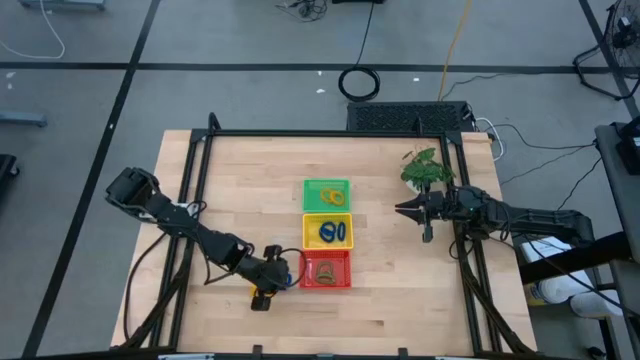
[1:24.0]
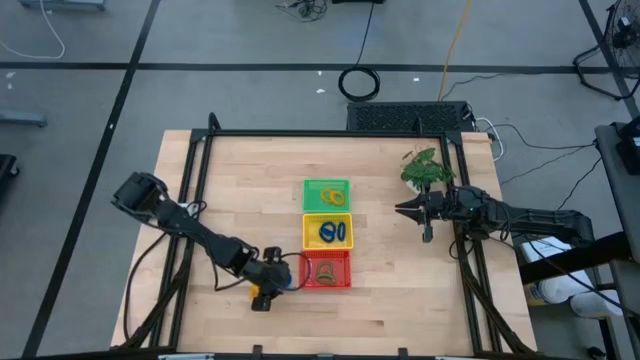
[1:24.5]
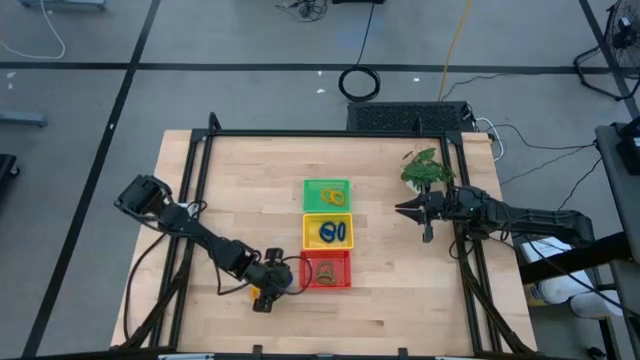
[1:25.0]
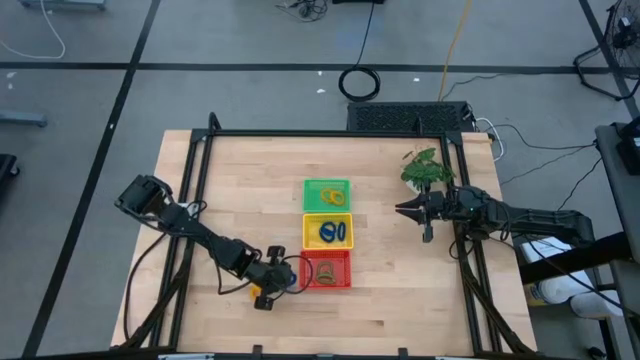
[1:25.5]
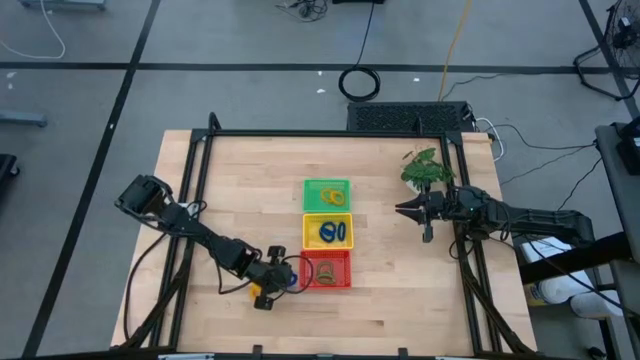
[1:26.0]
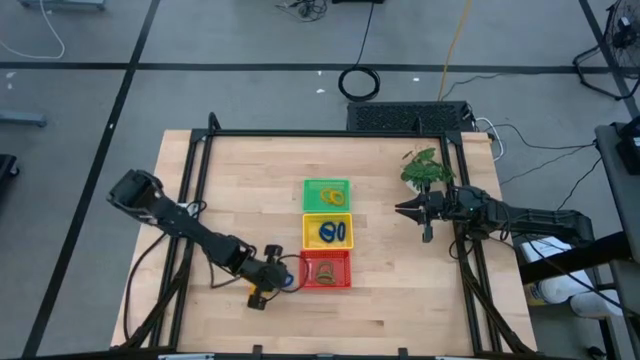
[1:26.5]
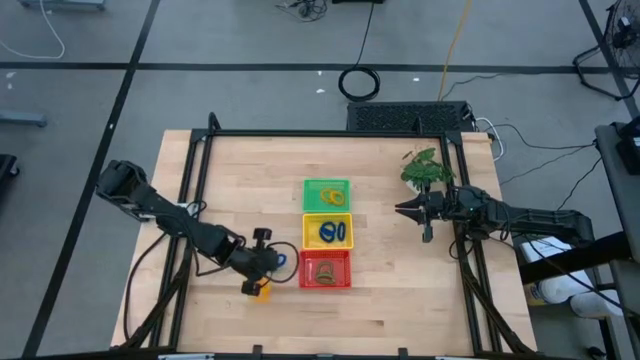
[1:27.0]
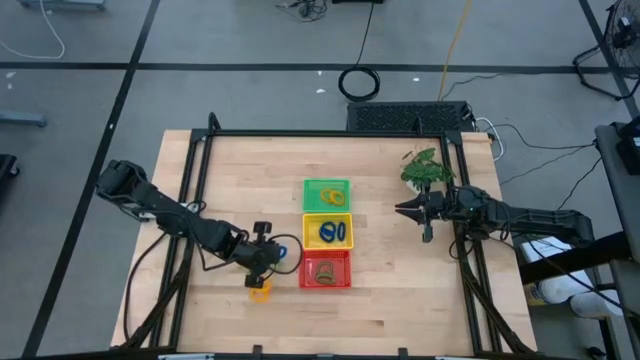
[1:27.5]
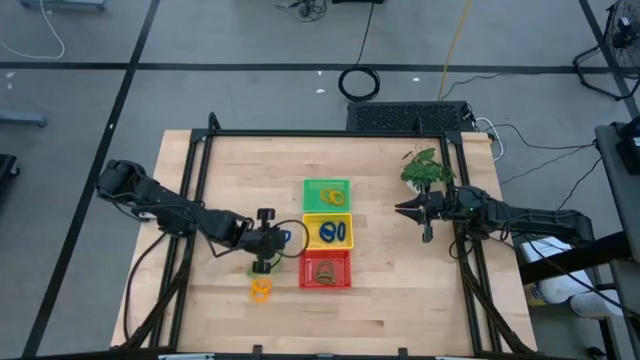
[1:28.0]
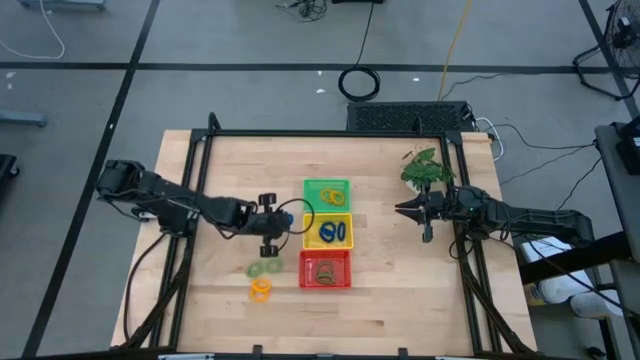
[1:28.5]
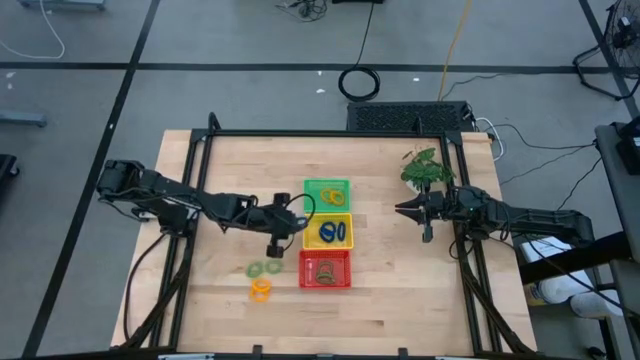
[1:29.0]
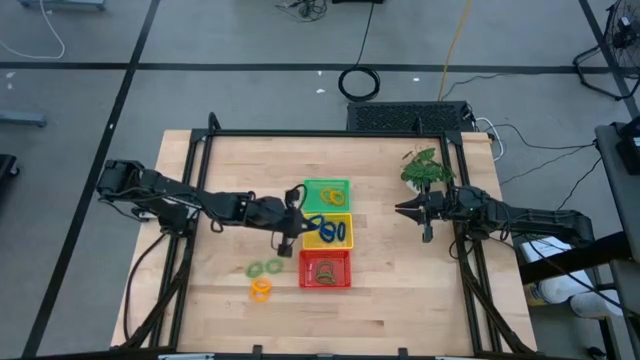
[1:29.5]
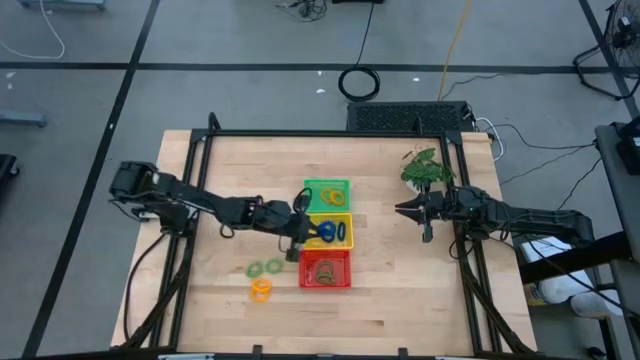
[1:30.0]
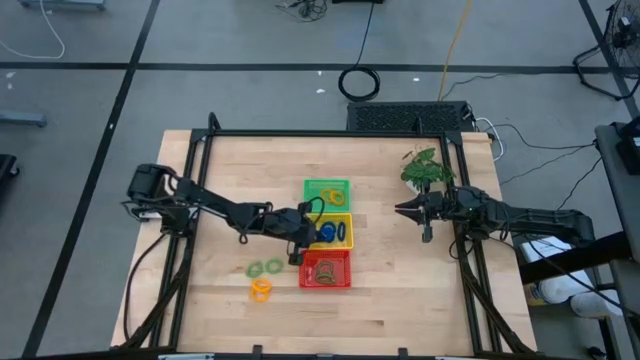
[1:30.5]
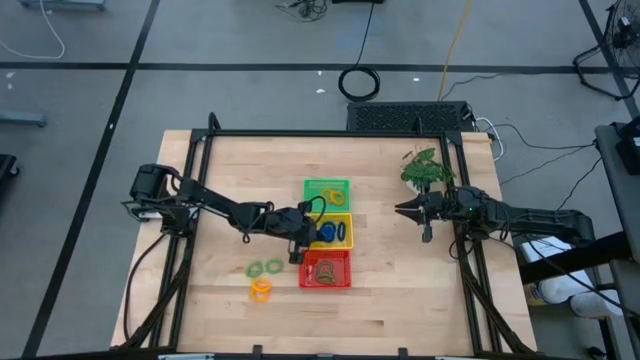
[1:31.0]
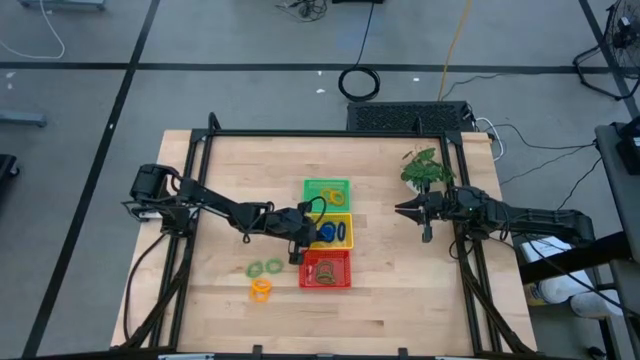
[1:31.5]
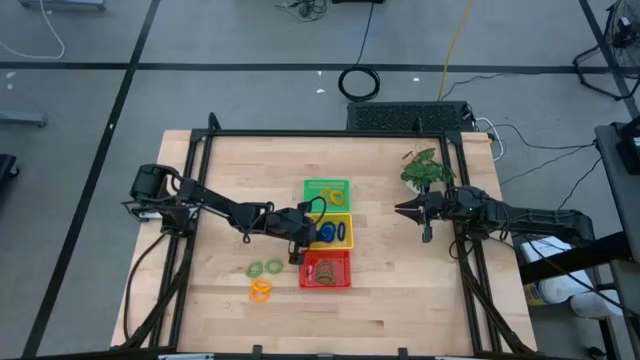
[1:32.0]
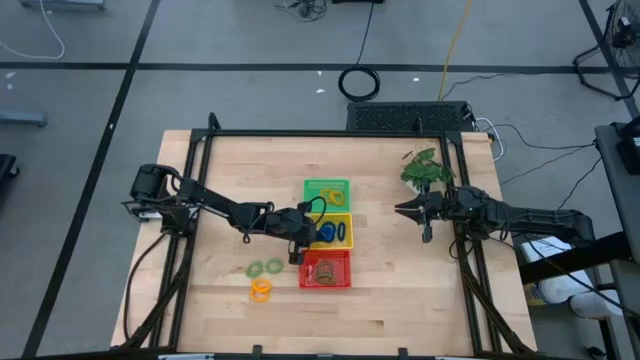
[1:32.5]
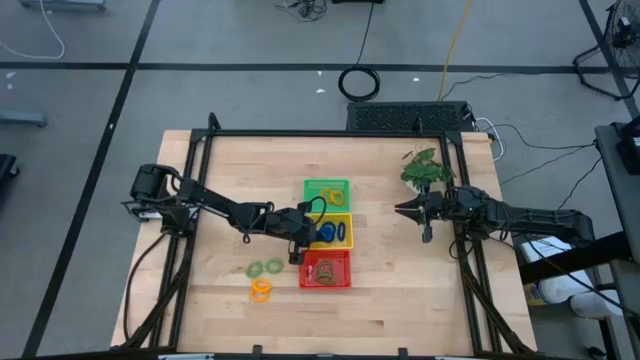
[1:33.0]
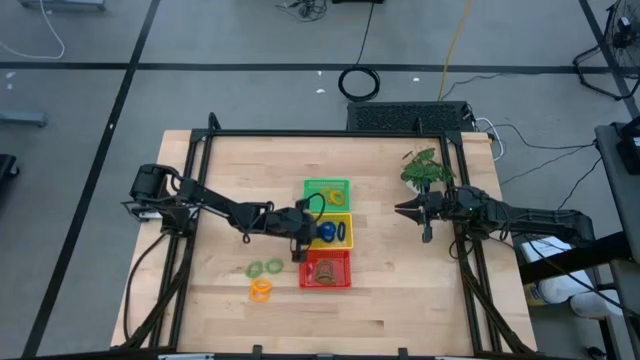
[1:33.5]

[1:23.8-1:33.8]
Task: Sort spring keychains into baskets
Put the blue spring keychain into the yellow basket

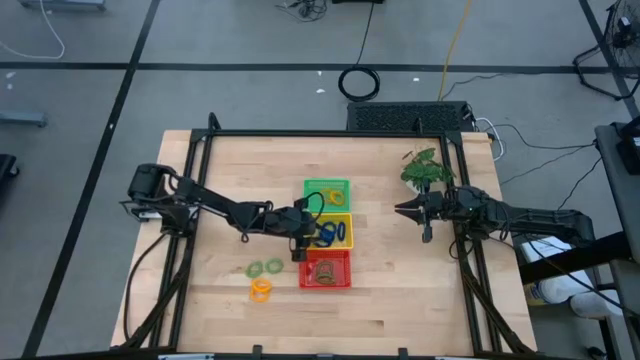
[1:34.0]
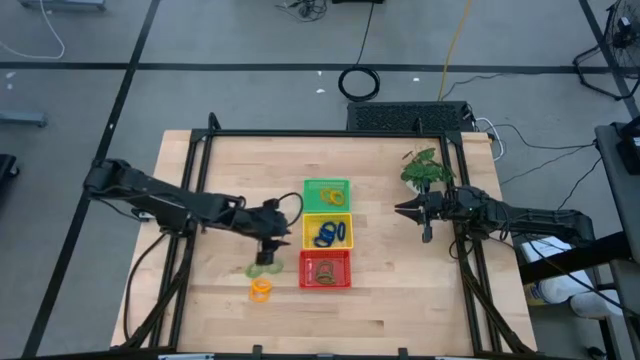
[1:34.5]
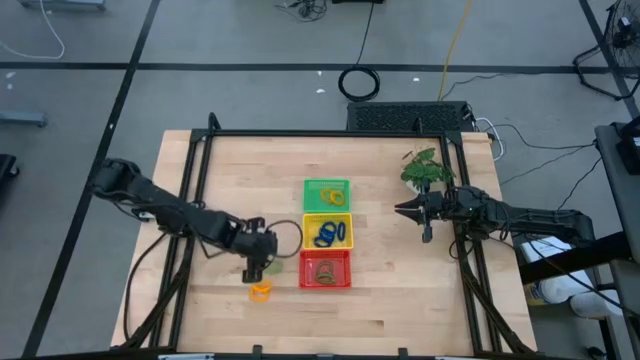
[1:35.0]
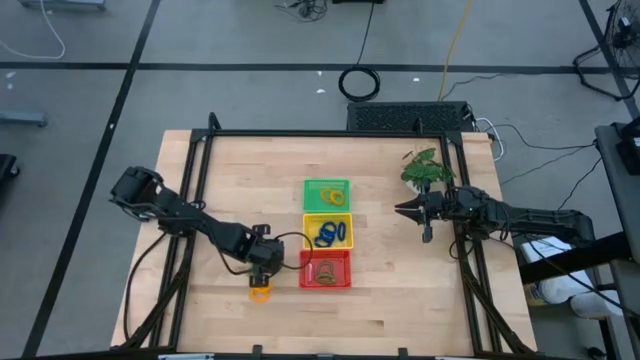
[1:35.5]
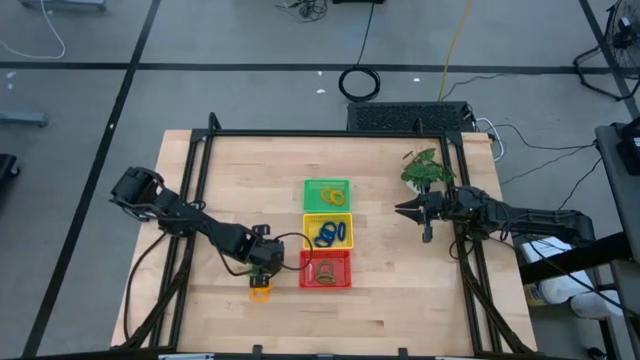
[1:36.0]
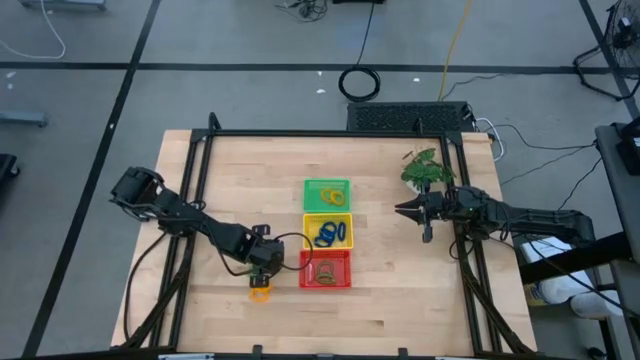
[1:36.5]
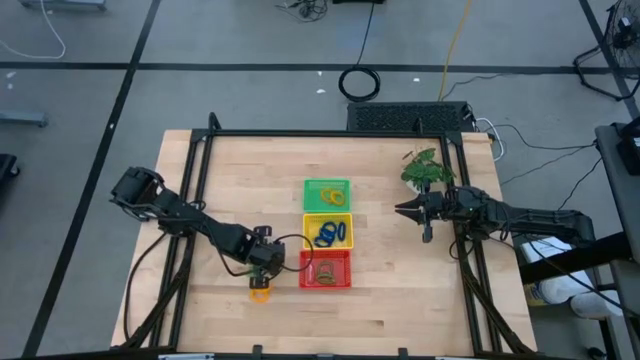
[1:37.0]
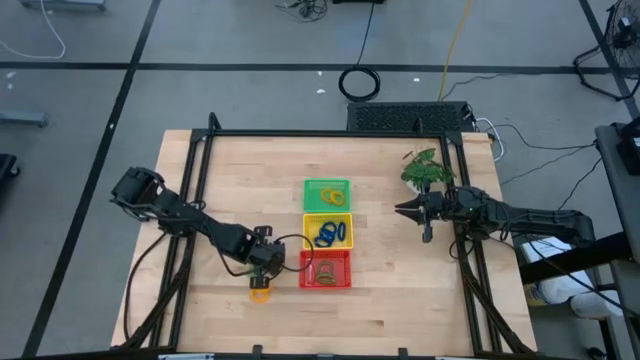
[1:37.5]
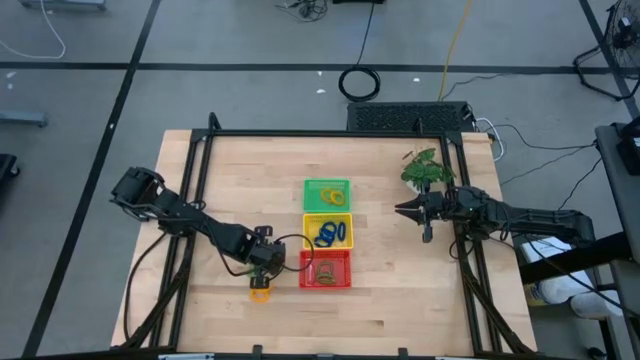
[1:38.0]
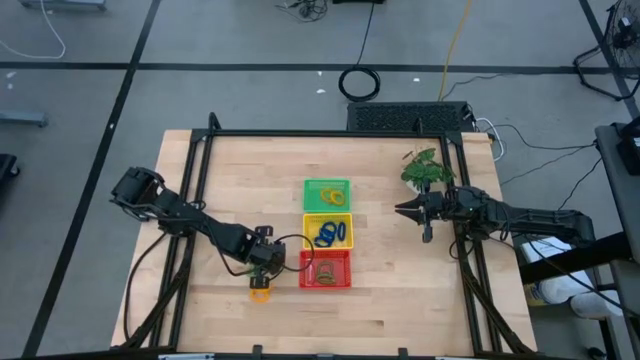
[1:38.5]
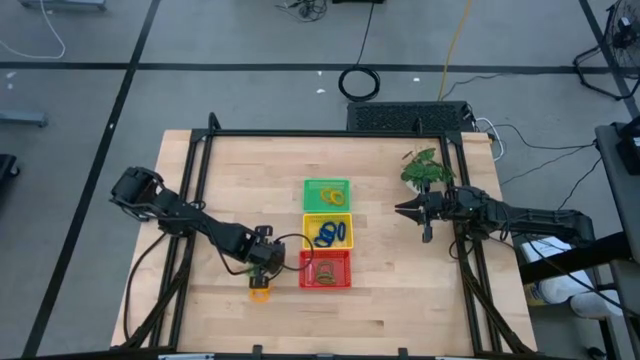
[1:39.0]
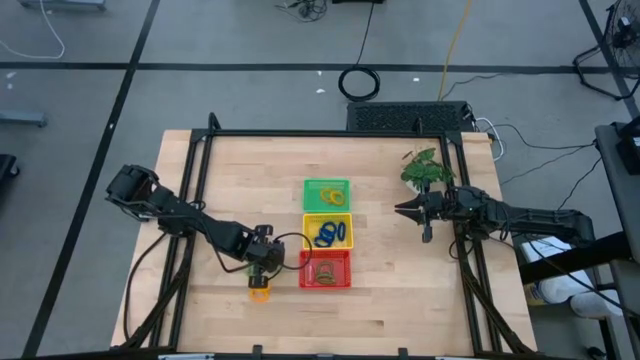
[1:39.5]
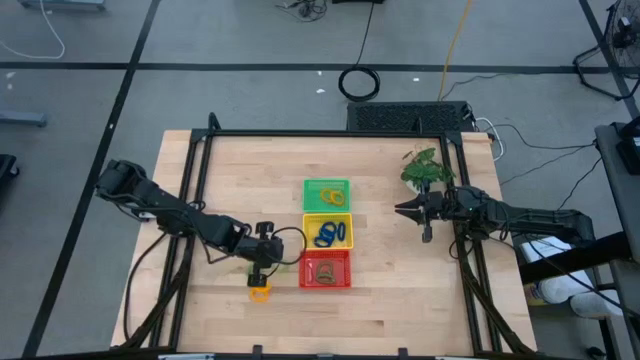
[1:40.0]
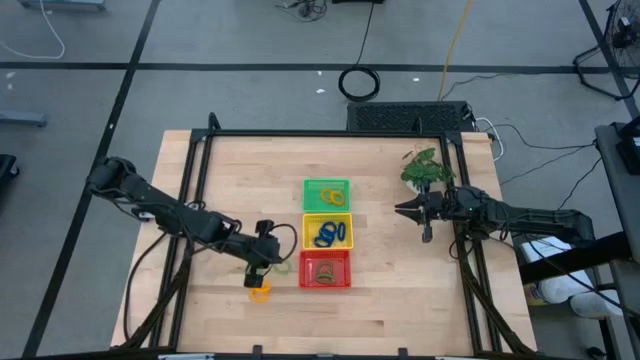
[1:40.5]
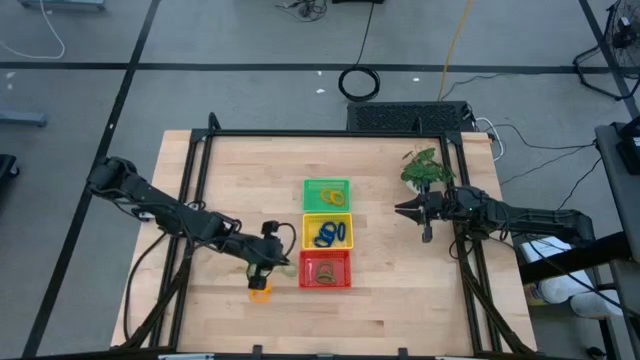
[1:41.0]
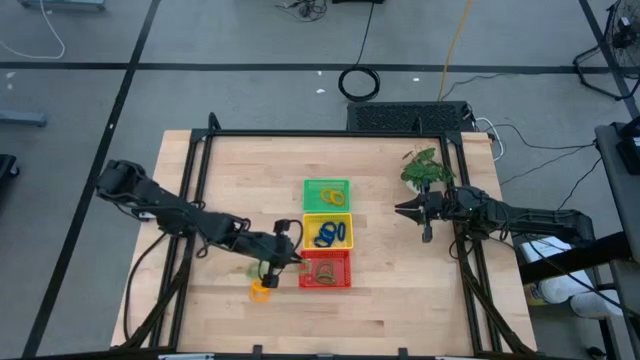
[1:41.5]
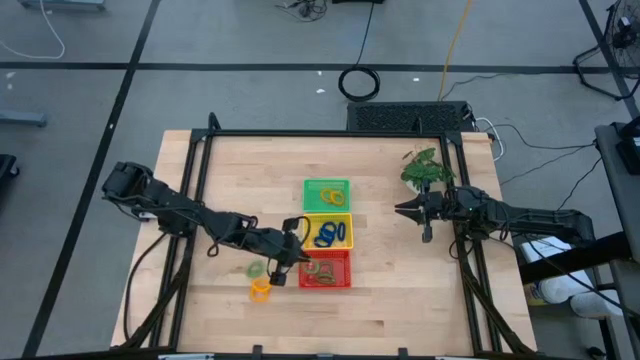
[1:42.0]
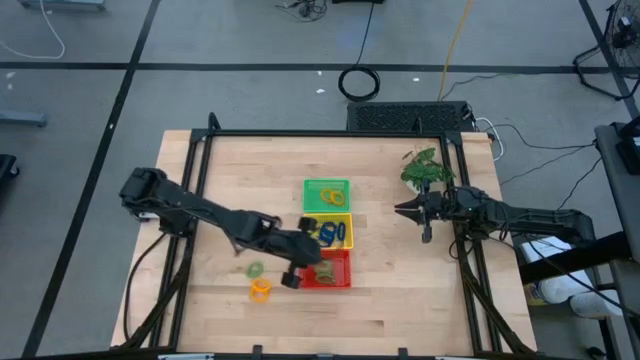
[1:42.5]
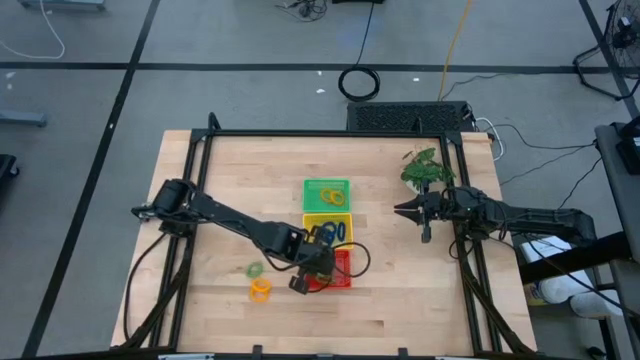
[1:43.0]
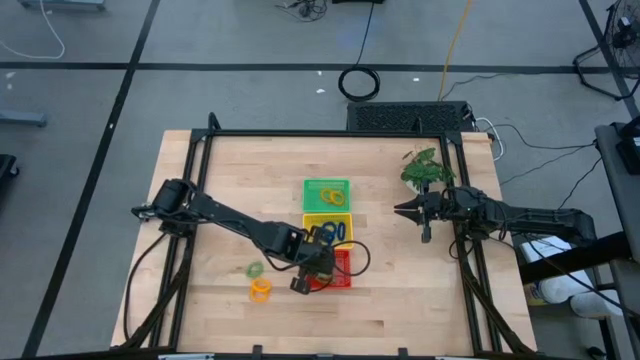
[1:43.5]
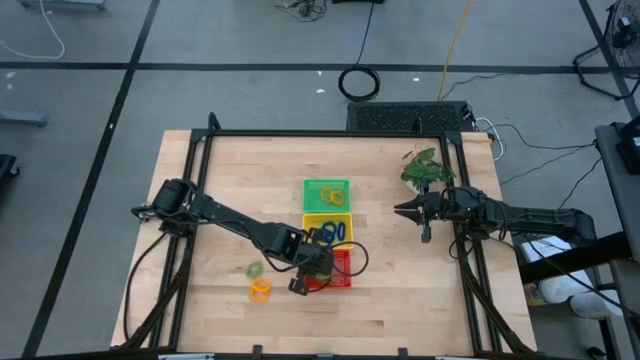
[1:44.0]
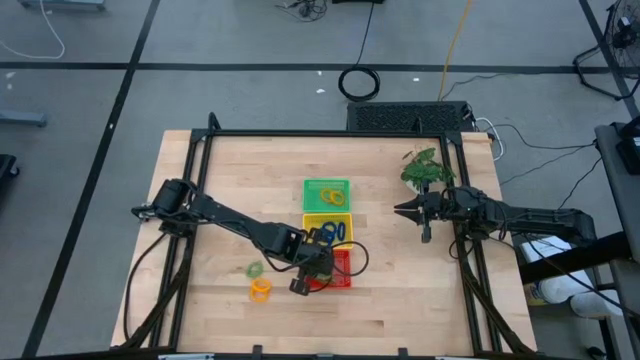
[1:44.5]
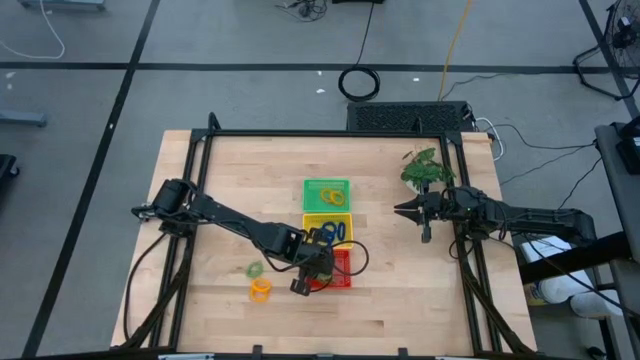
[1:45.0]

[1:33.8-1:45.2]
Put the green spring keychain into the red basket
